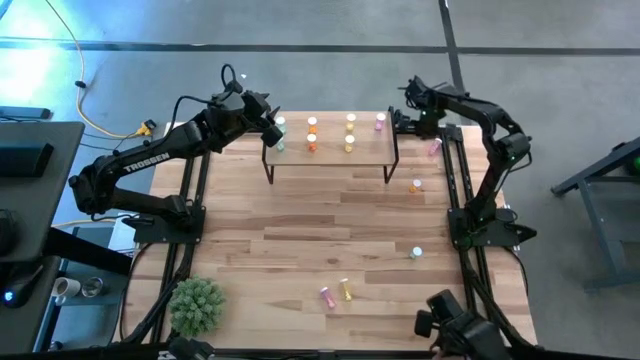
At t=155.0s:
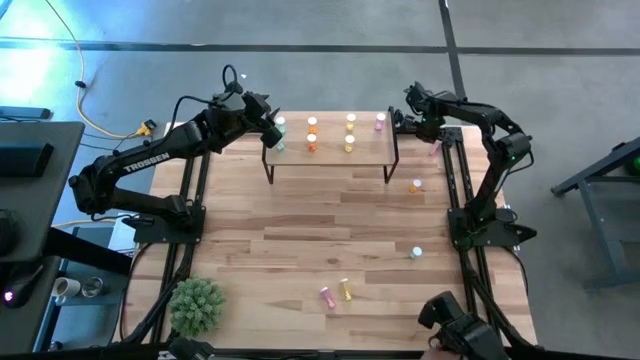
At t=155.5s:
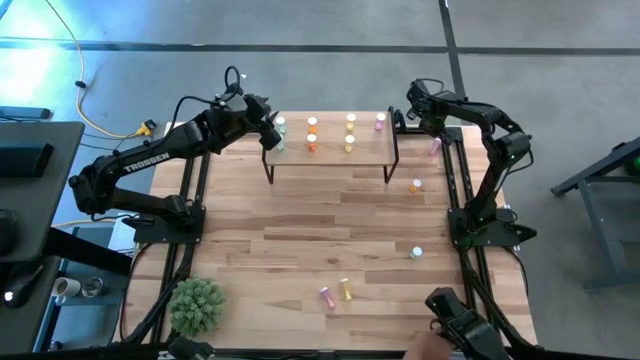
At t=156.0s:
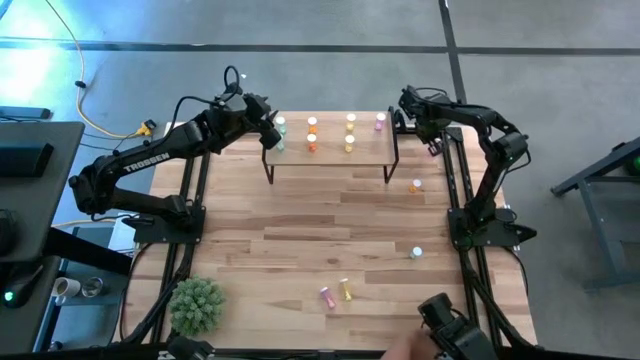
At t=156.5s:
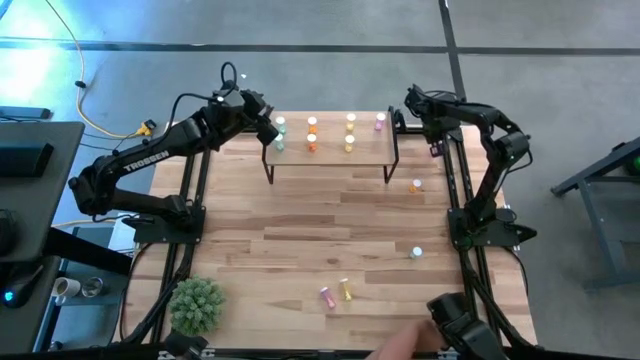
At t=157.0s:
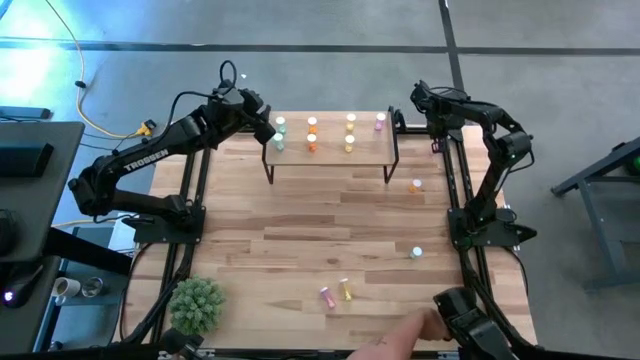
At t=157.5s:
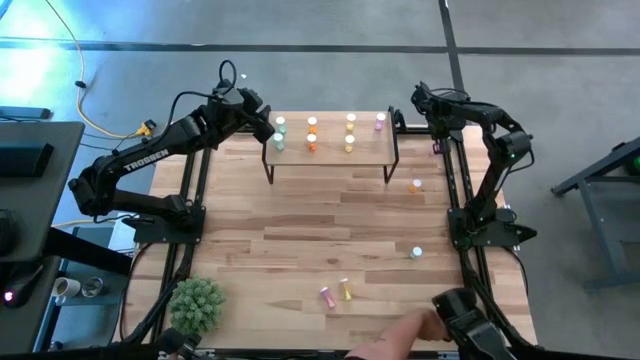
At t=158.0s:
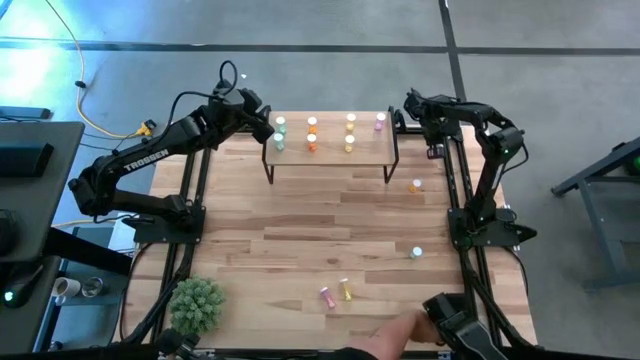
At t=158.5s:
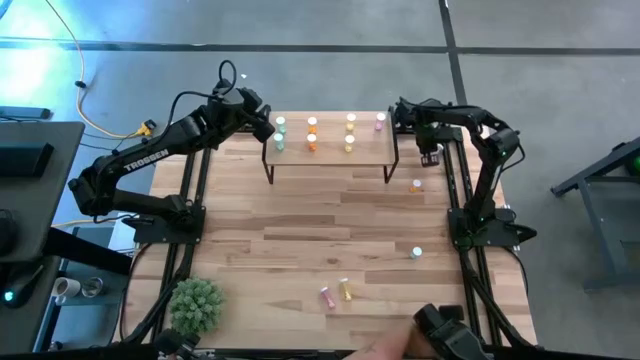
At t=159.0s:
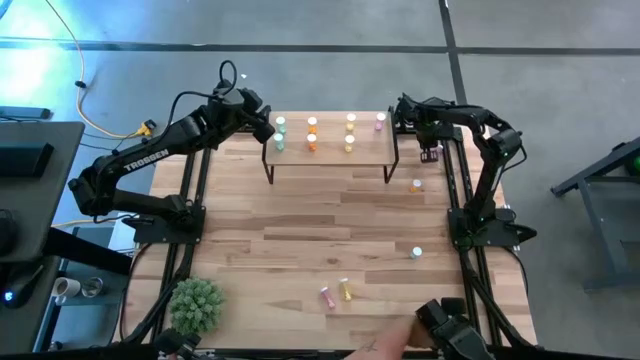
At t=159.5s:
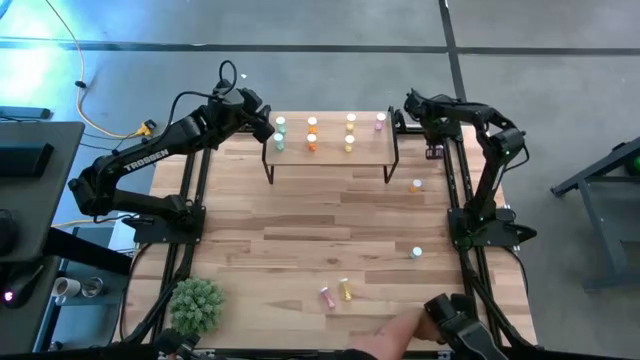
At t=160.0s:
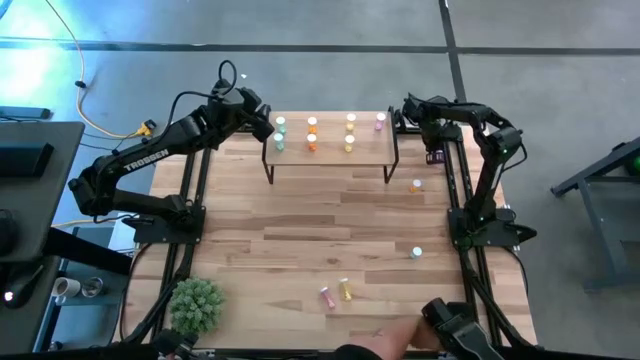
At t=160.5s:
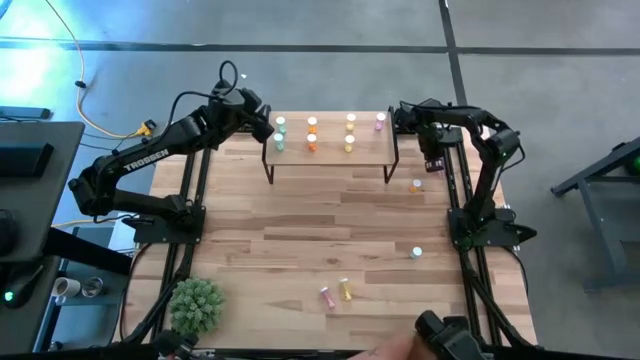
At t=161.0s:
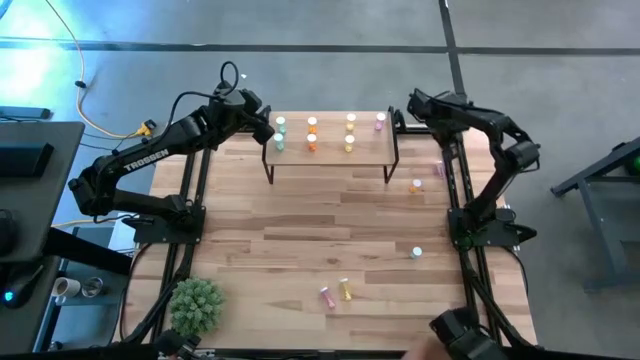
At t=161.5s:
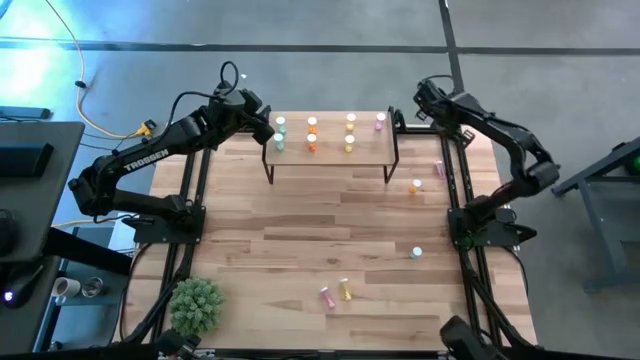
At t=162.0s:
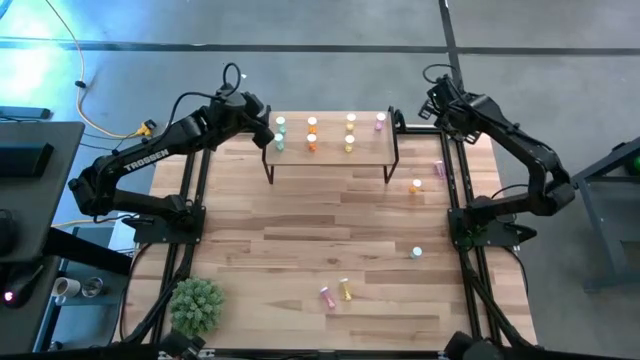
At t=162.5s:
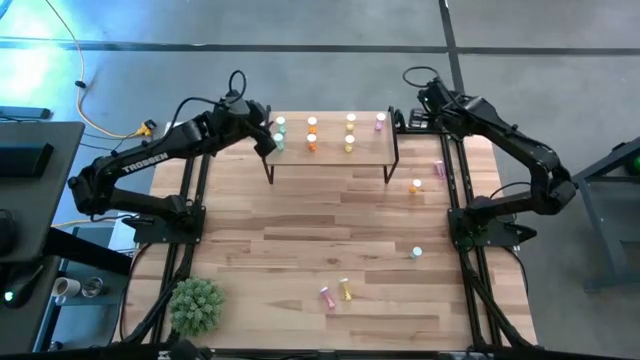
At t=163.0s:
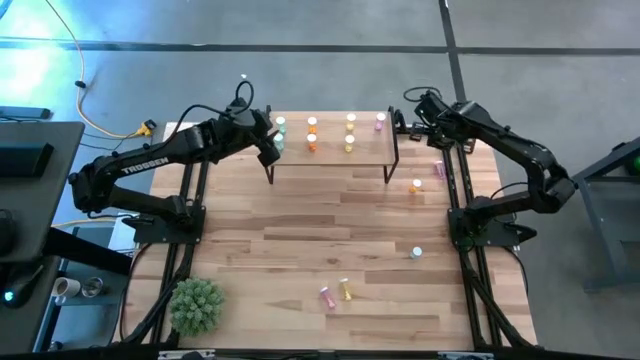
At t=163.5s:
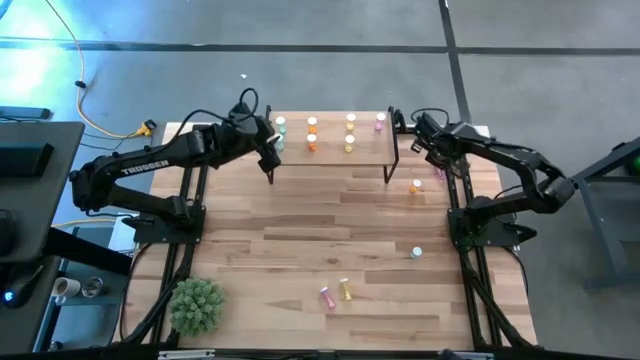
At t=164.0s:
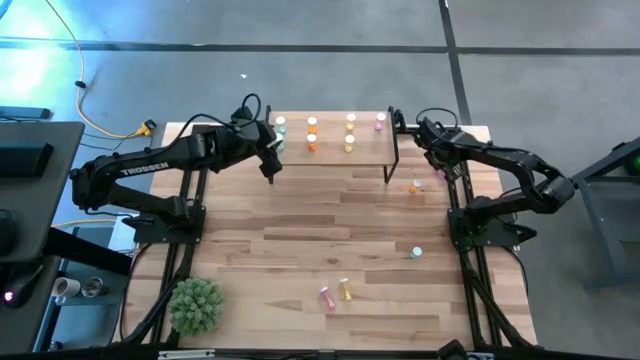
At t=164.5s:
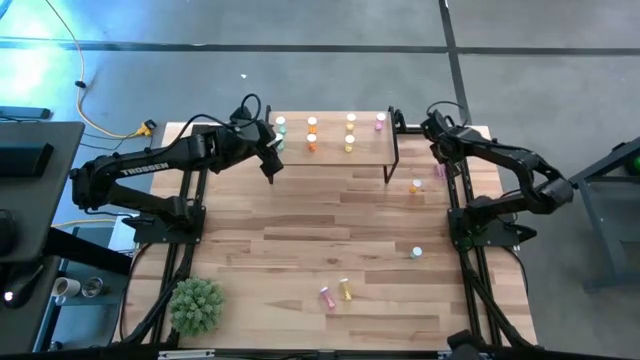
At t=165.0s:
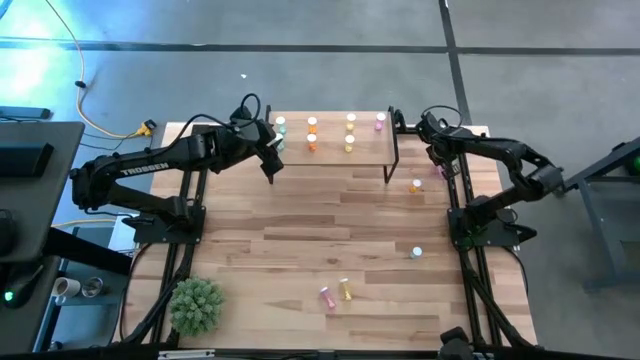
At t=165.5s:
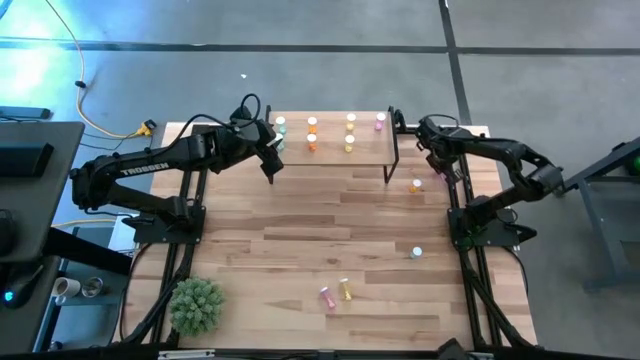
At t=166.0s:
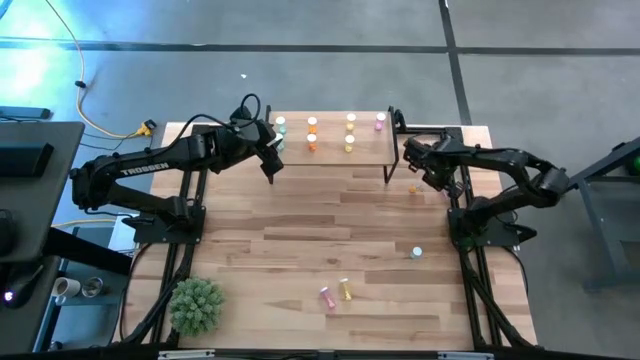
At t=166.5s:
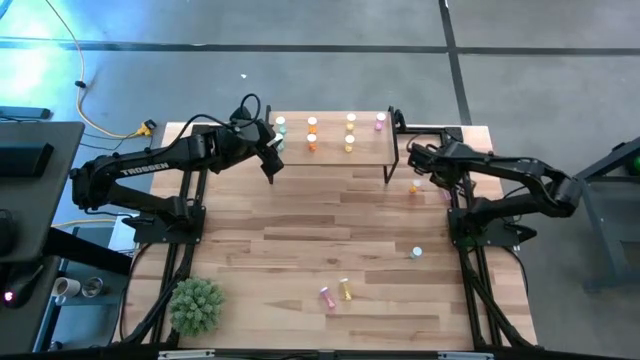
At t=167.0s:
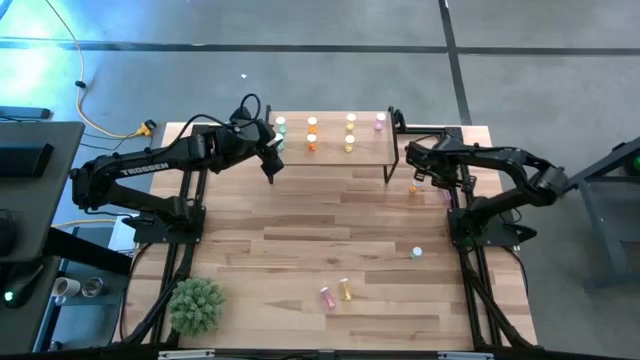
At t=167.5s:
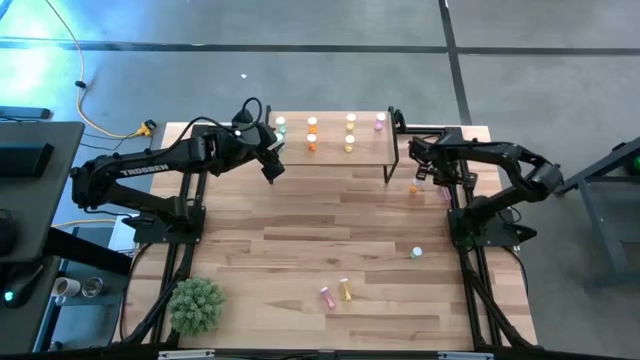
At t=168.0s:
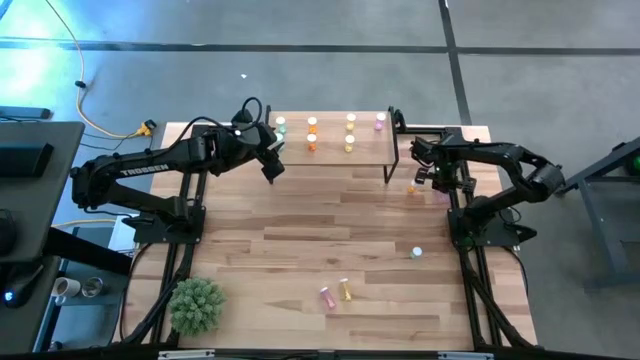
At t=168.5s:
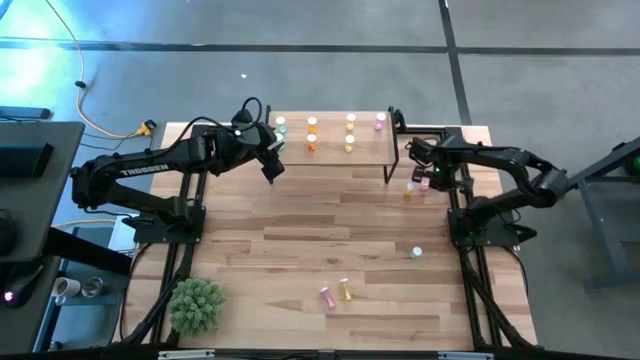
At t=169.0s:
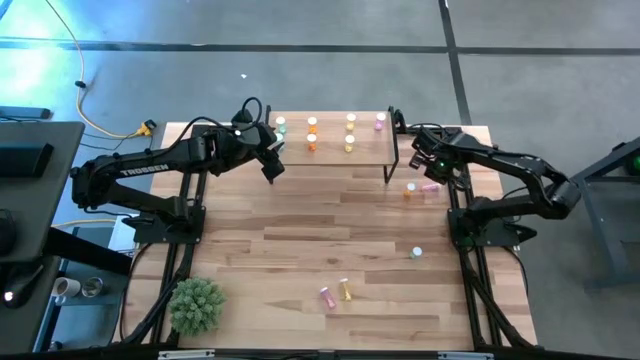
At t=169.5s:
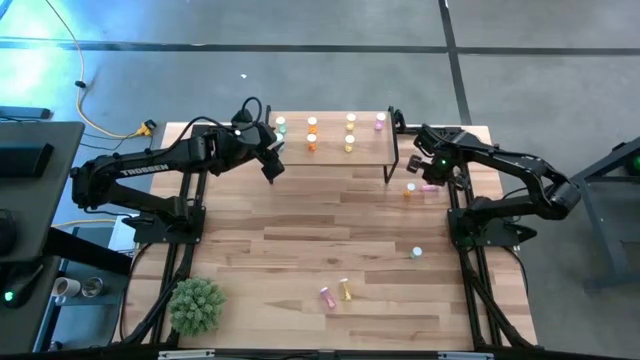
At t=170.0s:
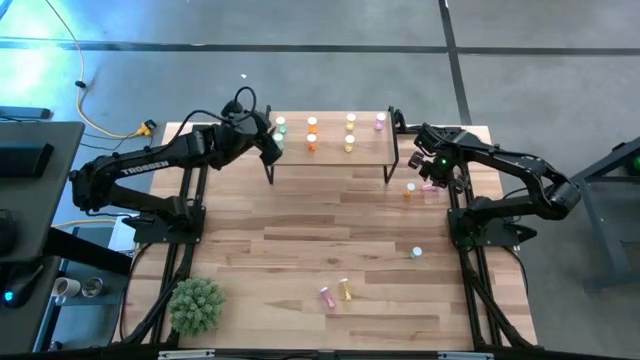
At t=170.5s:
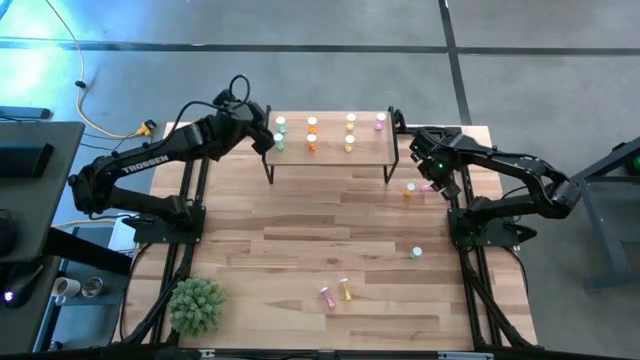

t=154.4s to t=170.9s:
Task: Pick and place medicine bottles onto shelf by color
Put the top violet pill bottle on the shelf aligned with the other violet pill bottle
